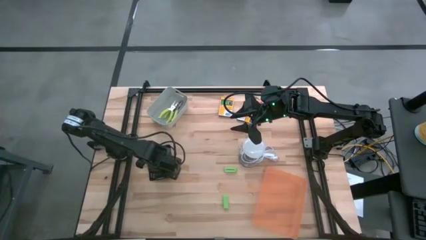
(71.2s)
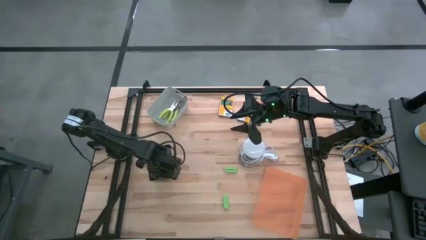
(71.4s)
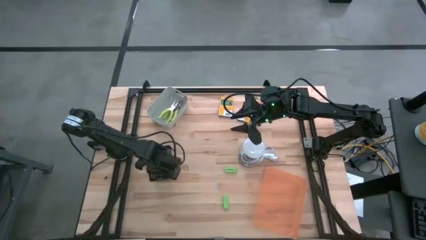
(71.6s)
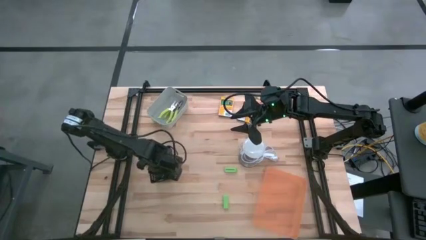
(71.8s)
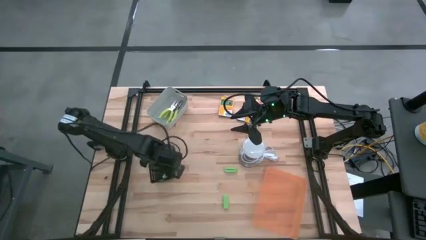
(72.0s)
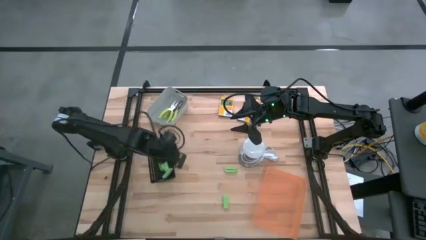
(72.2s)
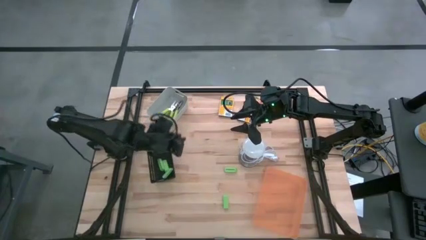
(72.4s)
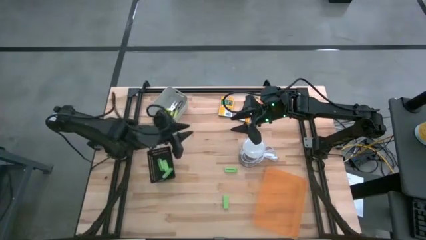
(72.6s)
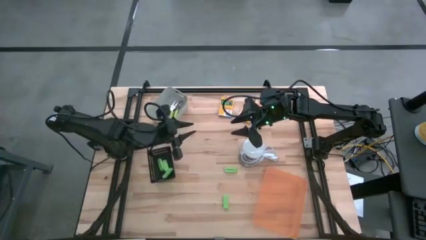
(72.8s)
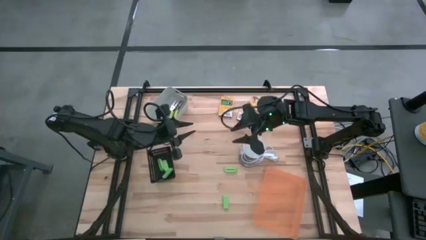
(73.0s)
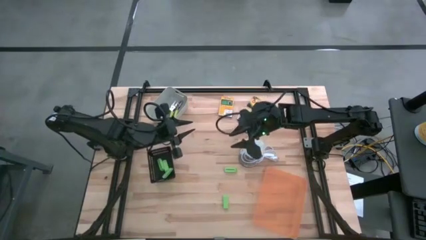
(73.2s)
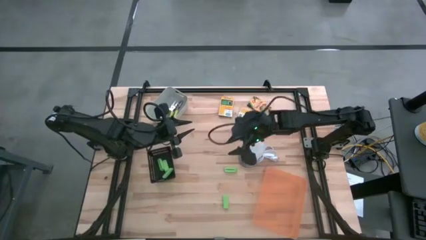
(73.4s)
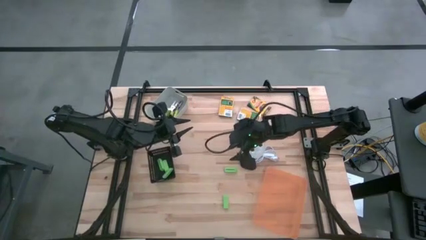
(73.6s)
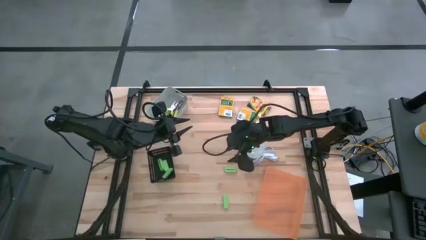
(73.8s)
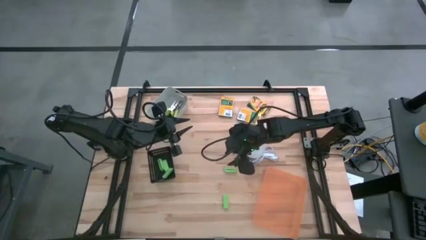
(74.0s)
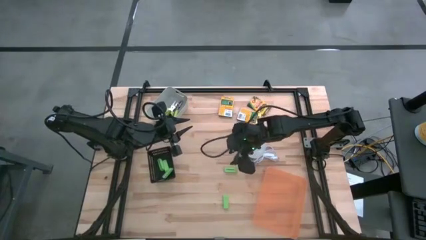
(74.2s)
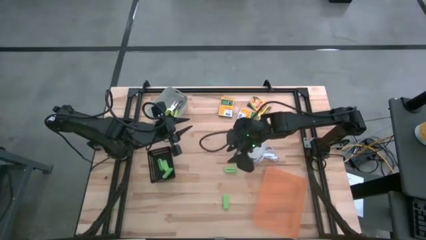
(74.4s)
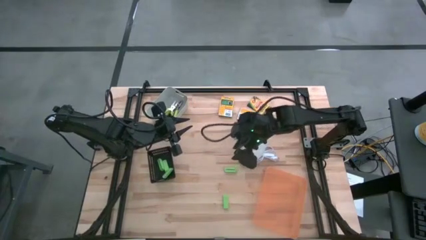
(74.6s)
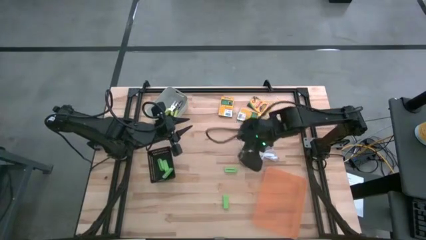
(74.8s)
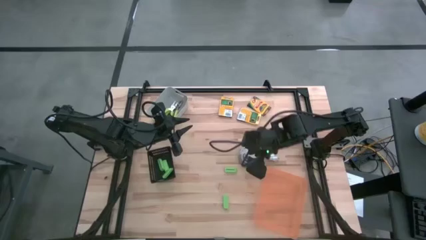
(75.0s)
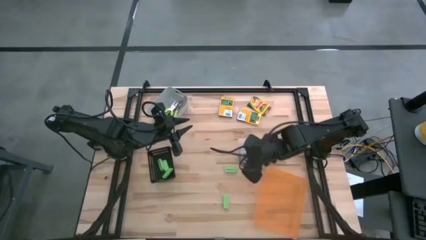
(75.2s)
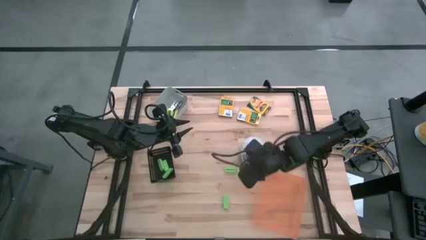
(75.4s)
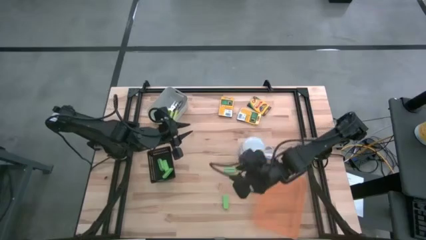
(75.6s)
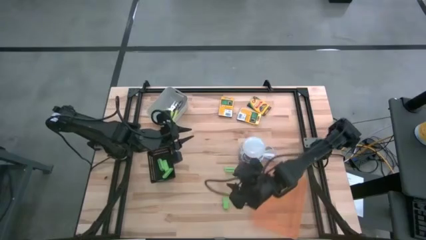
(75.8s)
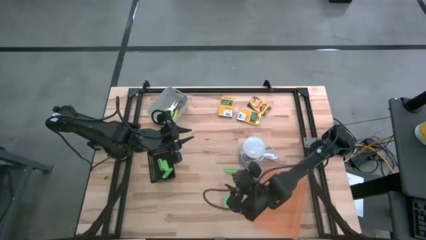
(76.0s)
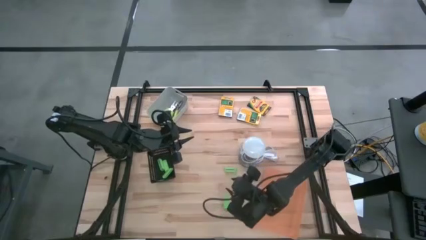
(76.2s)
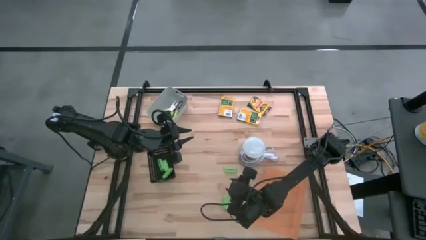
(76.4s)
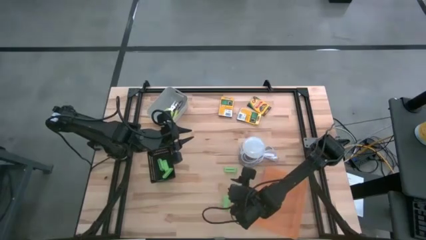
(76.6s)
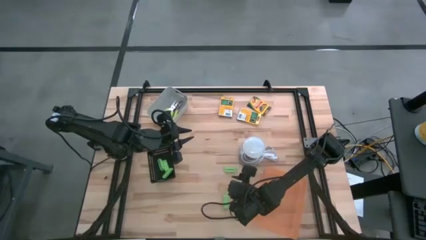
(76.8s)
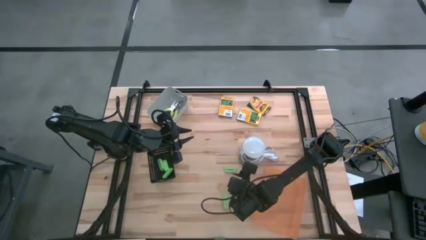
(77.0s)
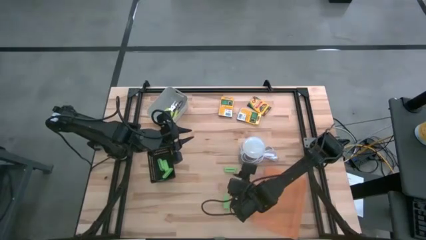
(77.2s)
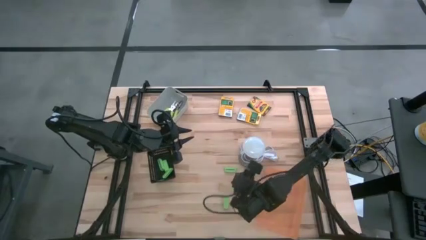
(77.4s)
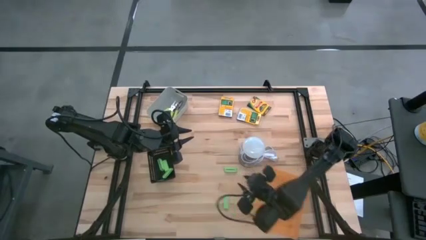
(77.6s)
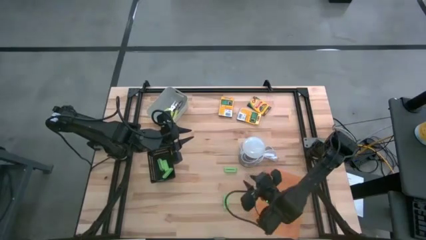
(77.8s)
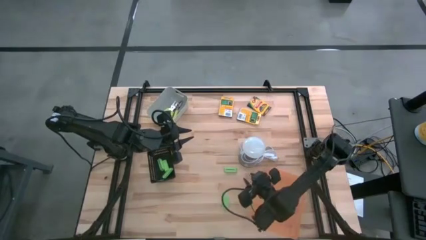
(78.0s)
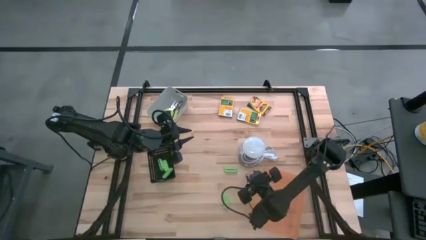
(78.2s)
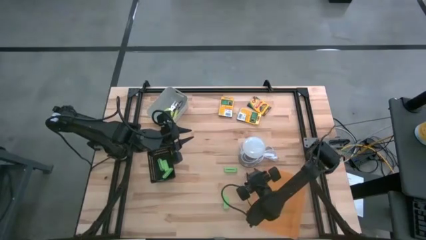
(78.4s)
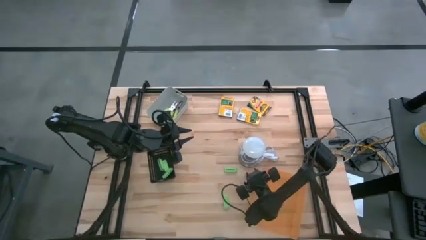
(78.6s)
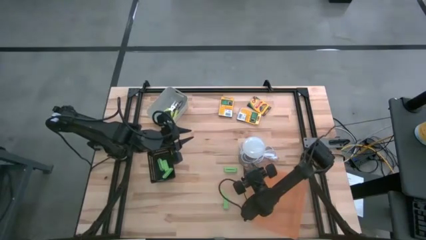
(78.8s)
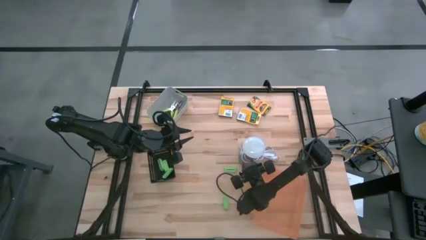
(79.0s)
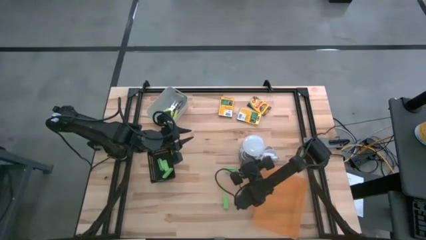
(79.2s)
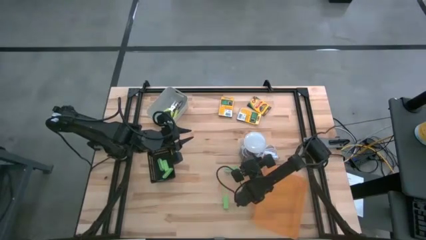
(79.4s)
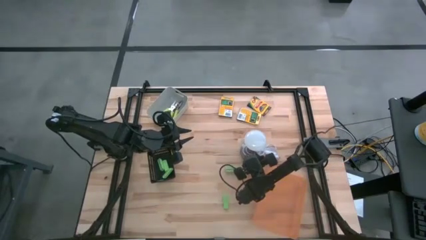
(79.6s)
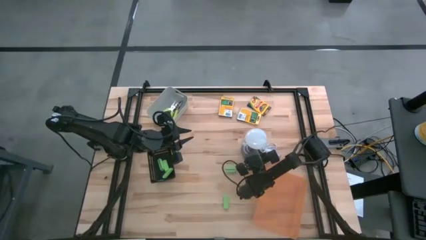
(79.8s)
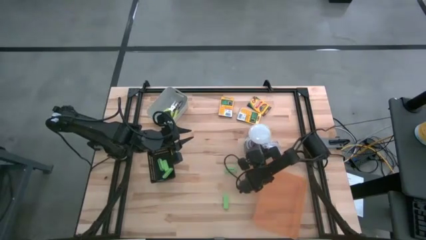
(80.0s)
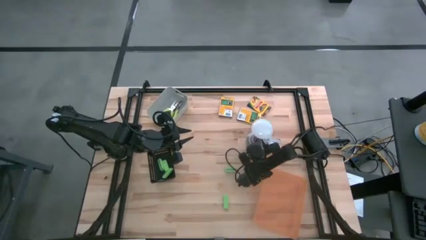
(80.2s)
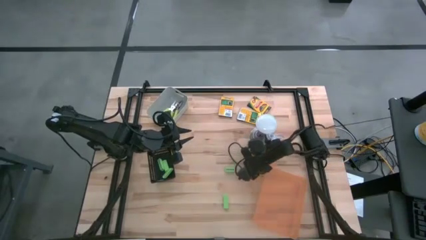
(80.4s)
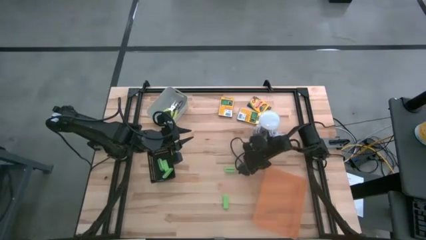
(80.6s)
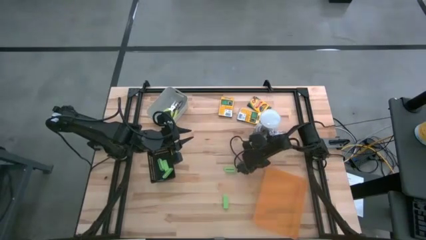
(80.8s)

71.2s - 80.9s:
Task: Pick & Place School Supplies
Adjust the lamp on the table

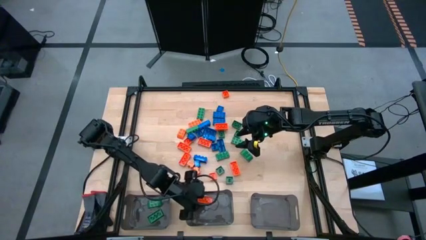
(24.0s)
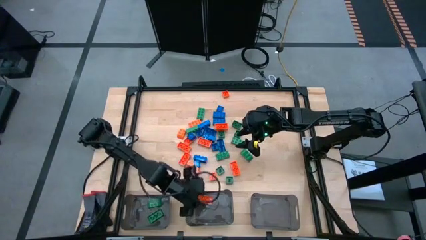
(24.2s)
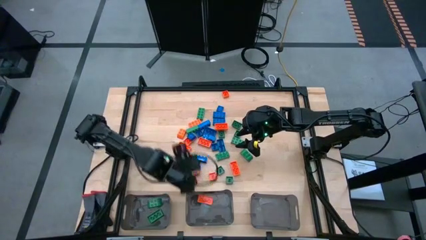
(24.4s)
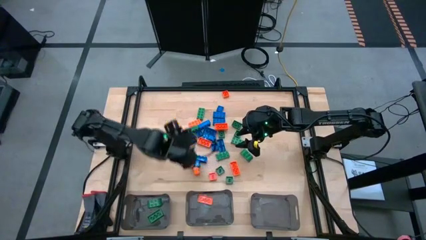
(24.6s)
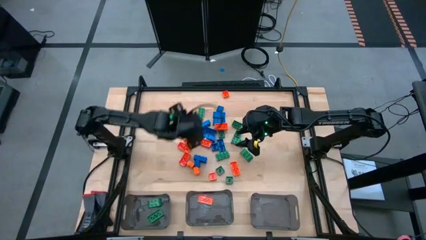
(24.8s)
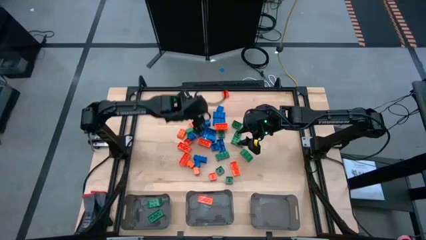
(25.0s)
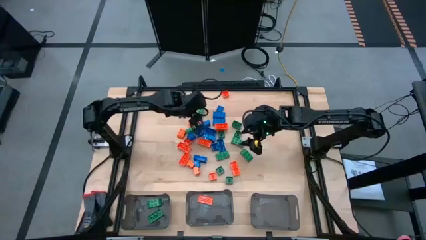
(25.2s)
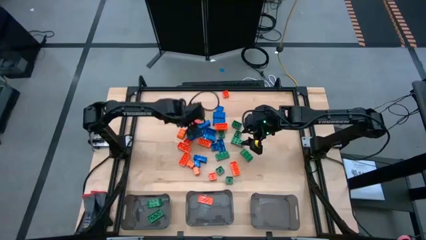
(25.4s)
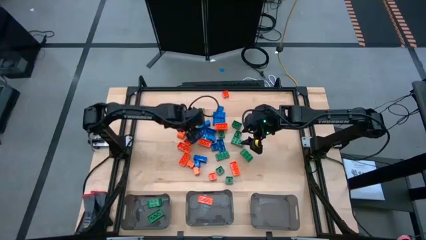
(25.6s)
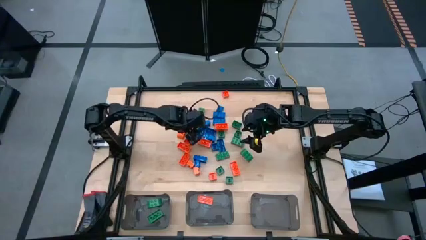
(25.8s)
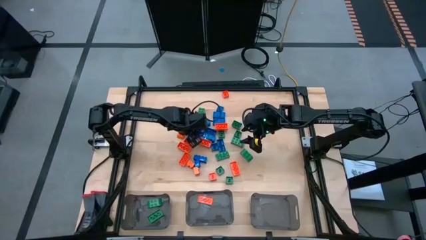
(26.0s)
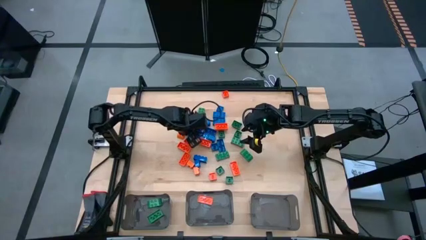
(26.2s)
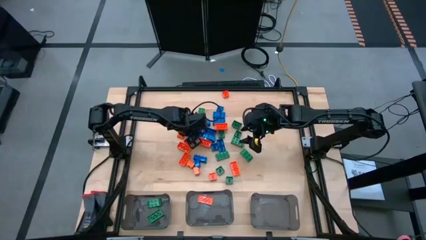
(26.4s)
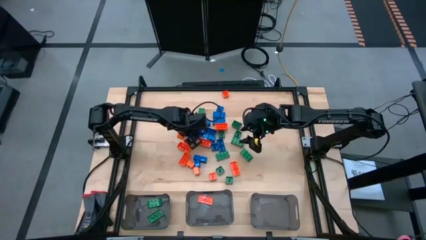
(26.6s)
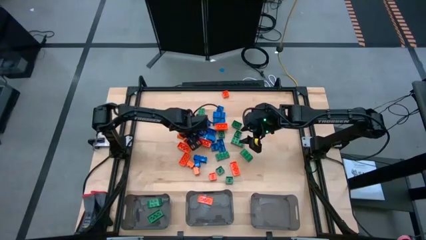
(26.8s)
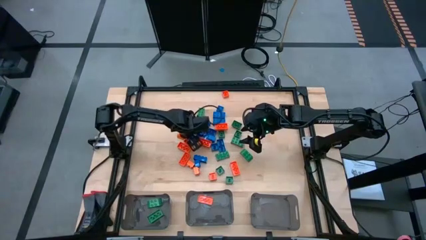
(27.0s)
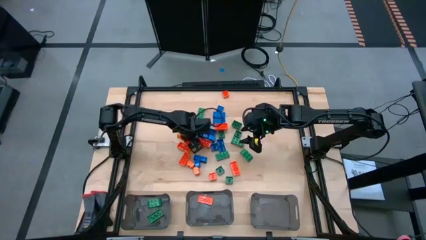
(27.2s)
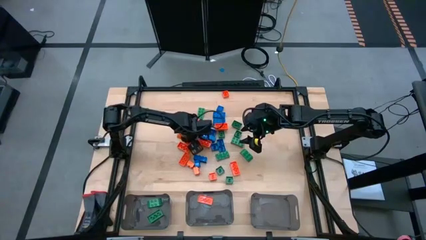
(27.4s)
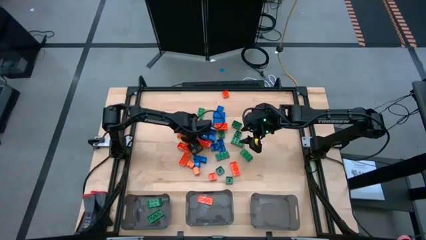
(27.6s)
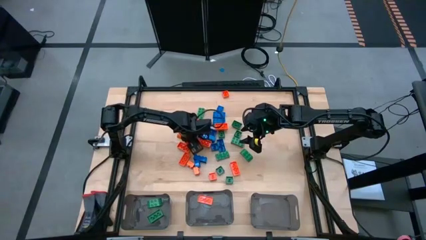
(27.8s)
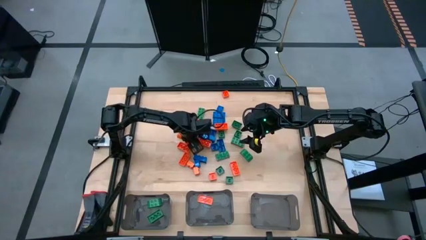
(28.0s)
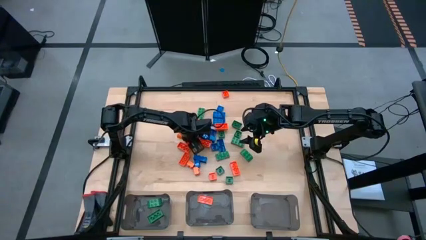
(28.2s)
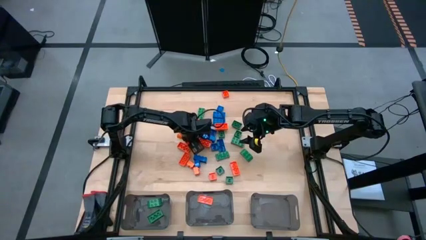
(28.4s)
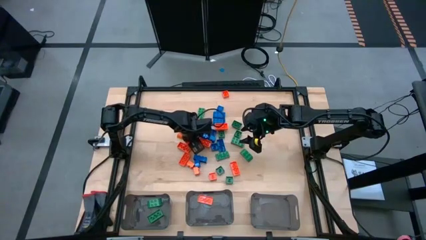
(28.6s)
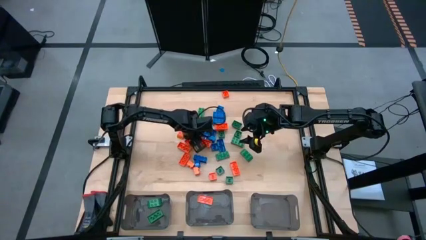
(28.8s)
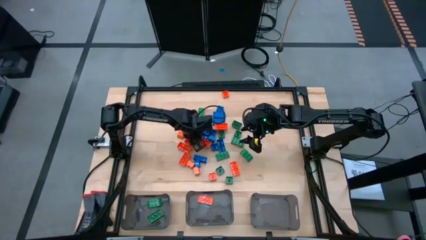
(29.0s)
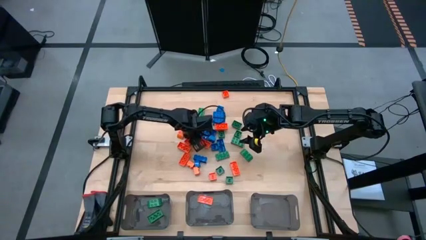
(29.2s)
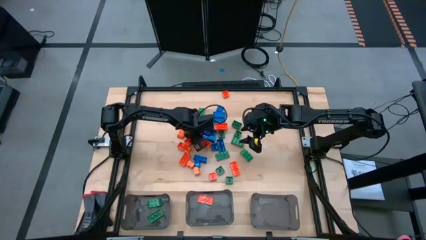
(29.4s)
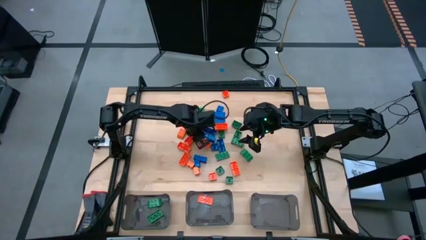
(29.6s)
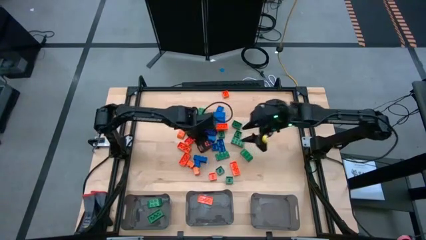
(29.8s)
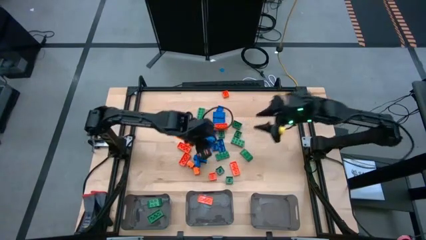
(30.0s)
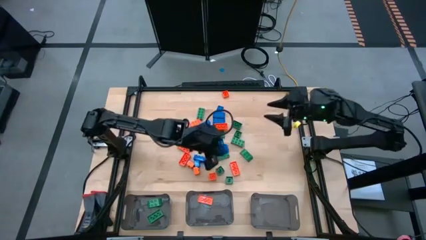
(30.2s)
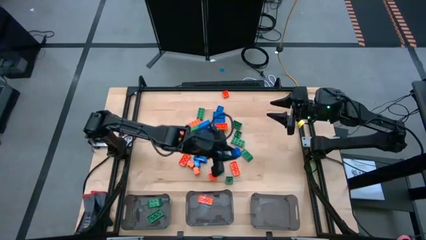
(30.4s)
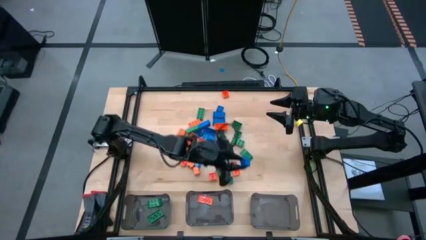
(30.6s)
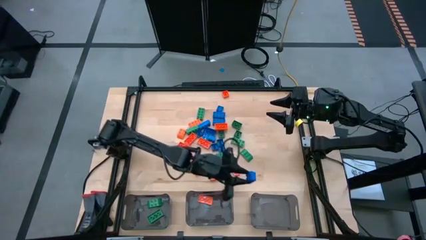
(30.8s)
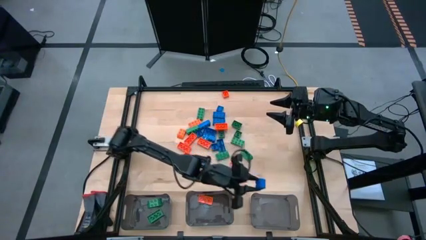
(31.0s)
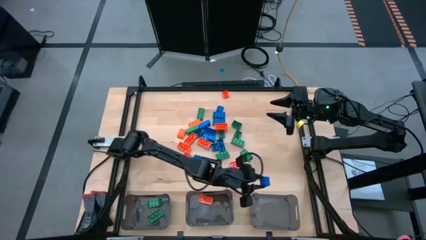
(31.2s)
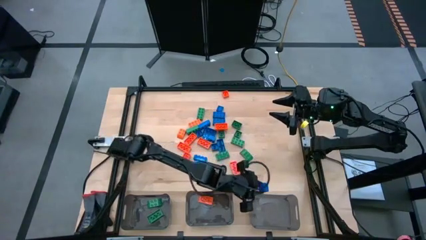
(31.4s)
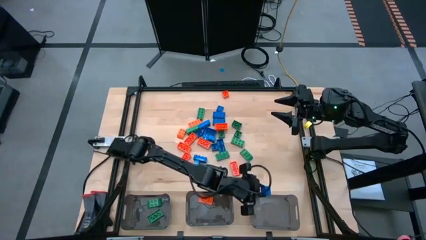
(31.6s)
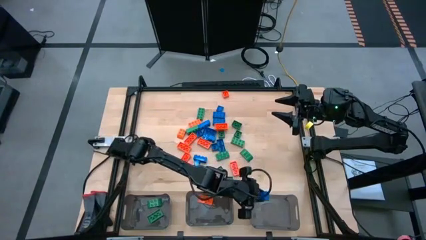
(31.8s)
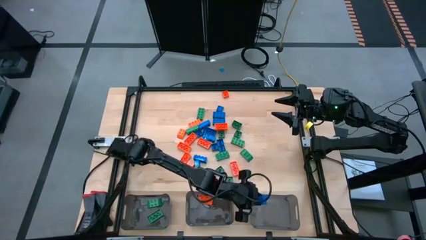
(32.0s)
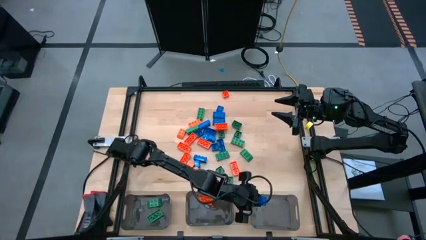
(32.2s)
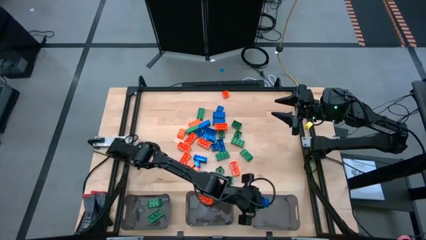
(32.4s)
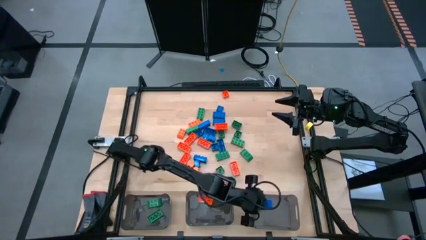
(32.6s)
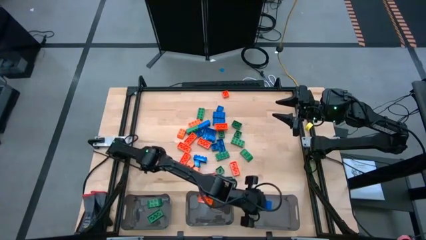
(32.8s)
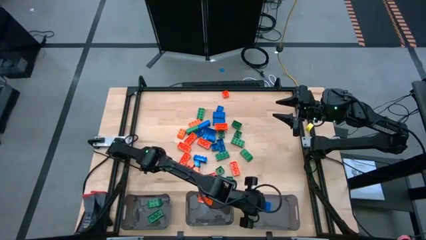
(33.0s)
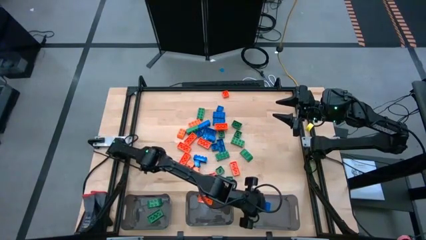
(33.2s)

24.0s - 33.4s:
Task: Sort blocks
Put the blue game piece into the right black bin
